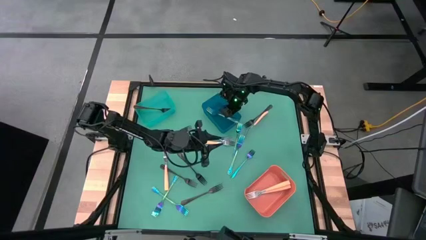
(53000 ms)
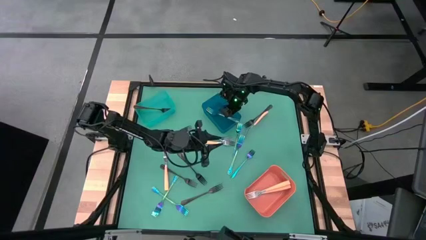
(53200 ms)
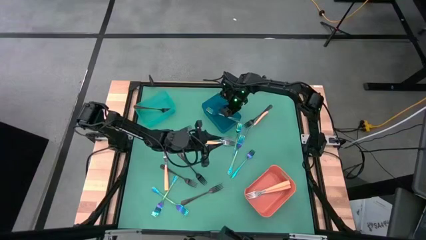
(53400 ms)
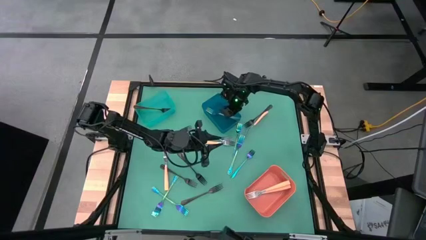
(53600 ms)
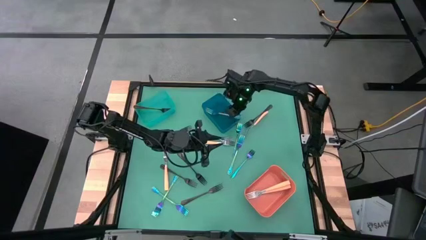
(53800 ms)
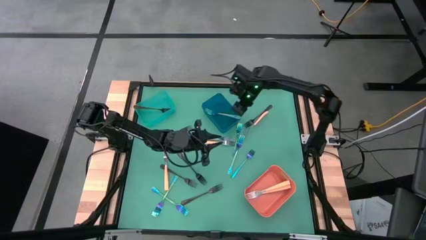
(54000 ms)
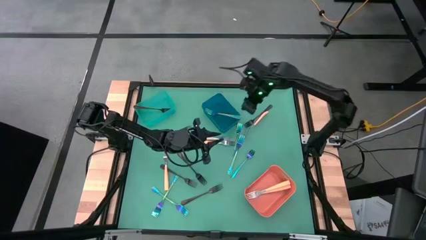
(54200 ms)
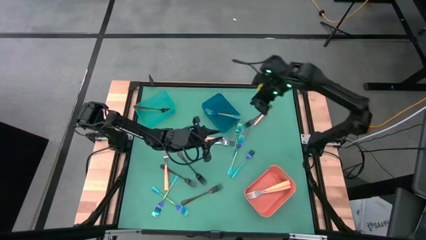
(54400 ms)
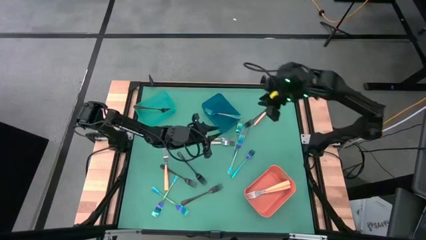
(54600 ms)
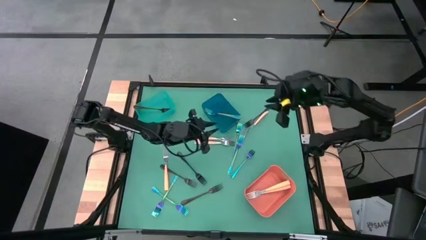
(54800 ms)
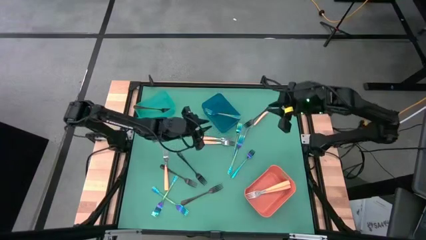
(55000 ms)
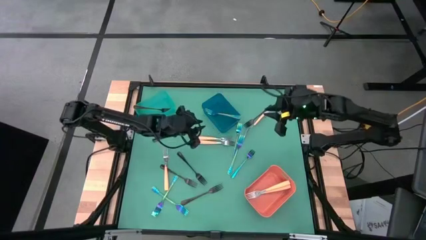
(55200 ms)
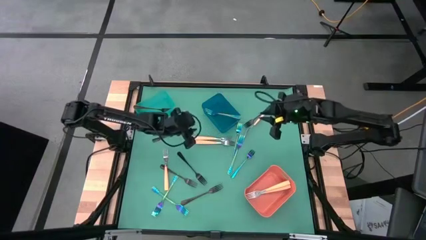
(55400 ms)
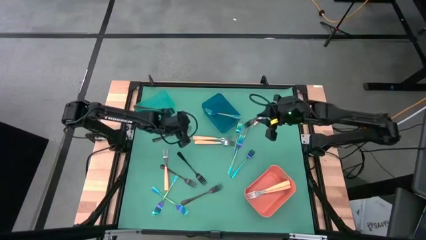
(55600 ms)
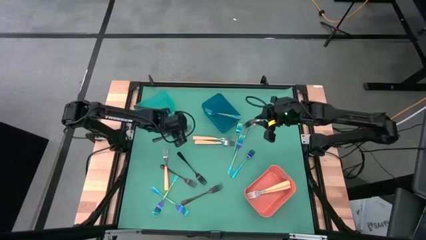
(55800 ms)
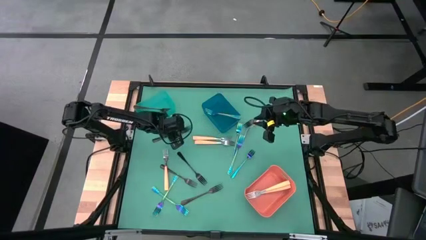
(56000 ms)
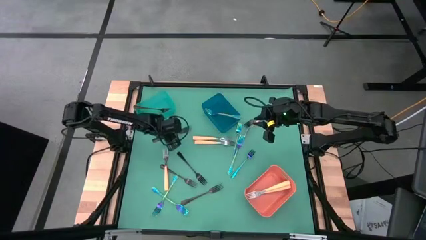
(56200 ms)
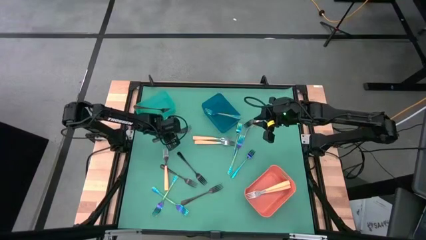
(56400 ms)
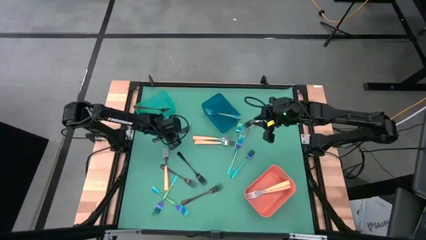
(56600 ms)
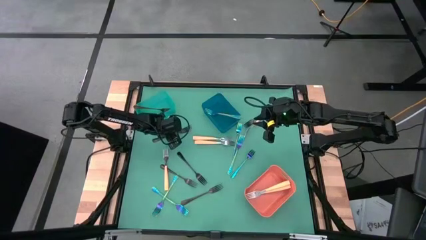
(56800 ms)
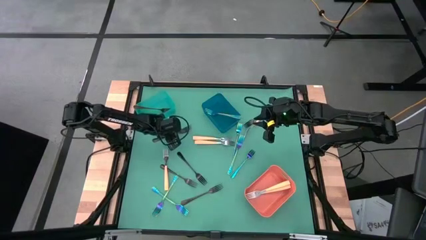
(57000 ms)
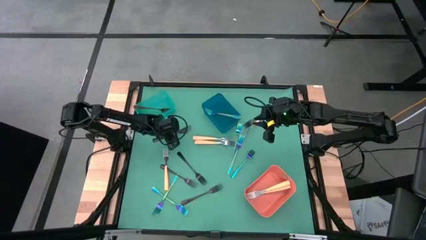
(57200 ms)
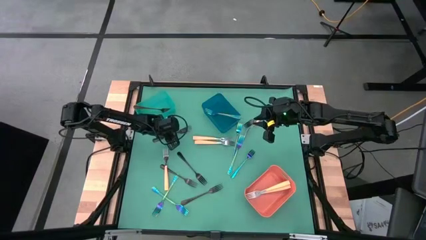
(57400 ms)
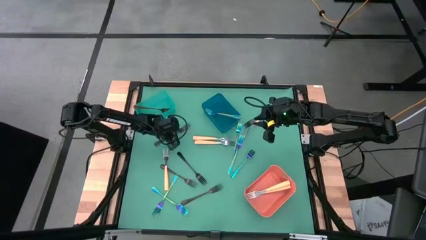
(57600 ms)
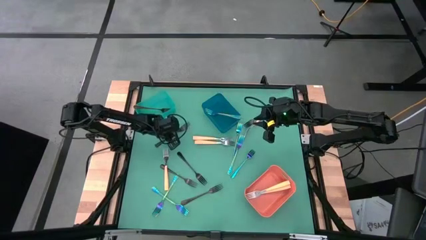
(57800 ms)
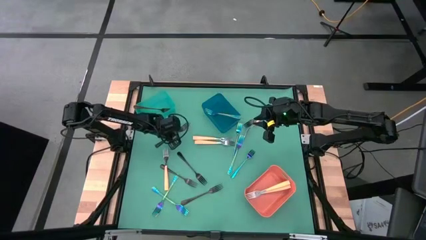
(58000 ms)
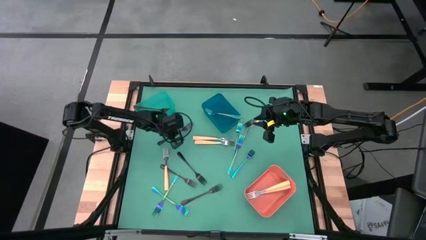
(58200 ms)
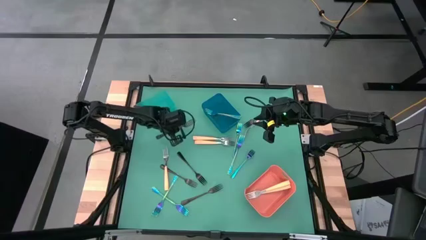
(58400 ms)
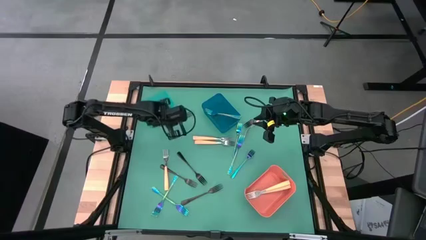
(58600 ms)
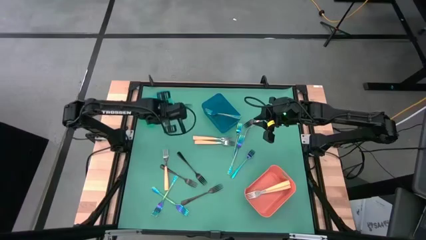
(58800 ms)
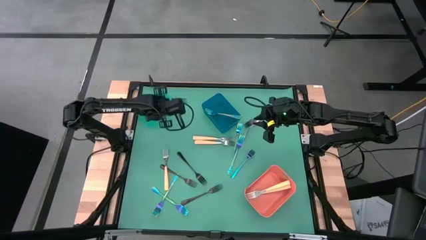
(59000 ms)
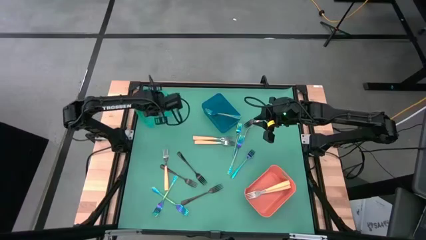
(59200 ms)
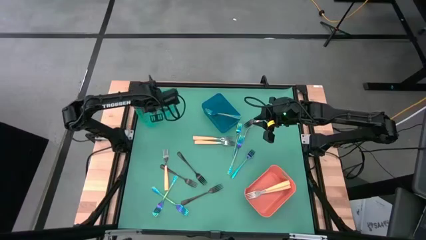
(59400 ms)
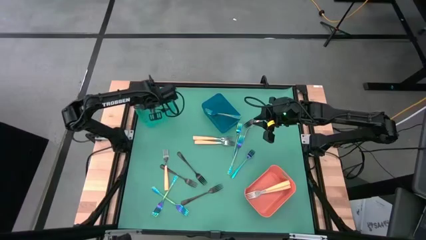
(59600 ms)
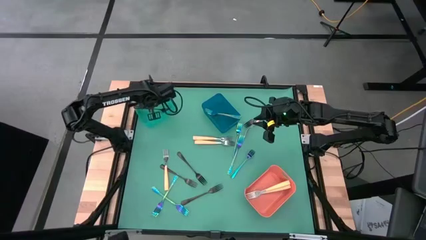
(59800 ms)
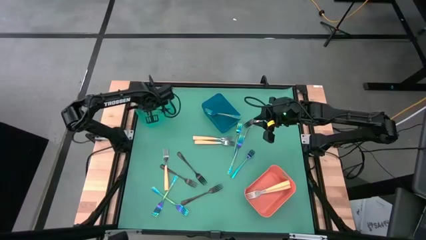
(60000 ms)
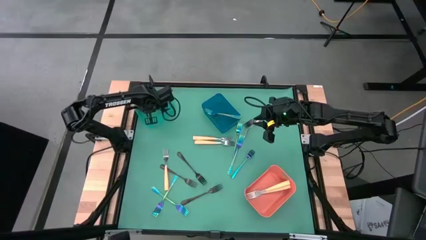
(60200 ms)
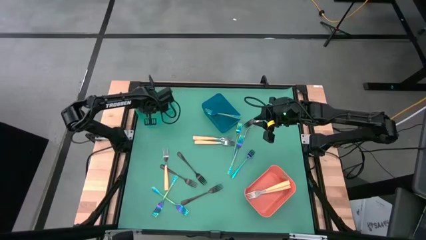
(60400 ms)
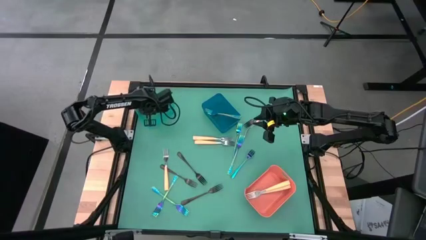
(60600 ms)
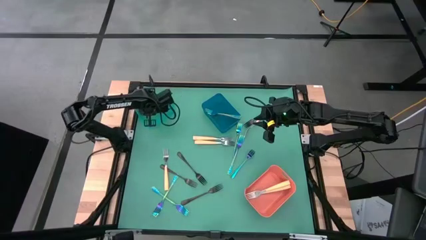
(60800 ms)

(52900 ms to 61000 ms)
Task: Sort silverware by color (type)
Put the black fork into the green bin

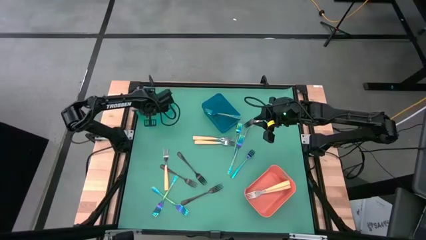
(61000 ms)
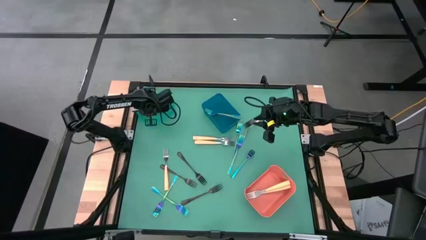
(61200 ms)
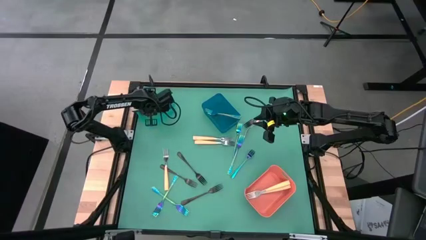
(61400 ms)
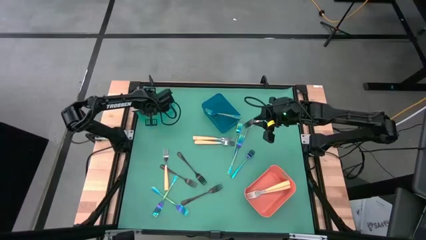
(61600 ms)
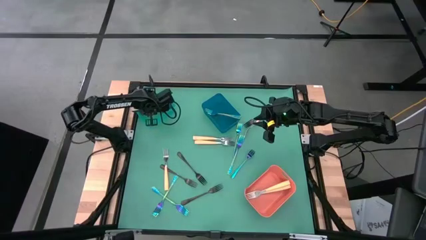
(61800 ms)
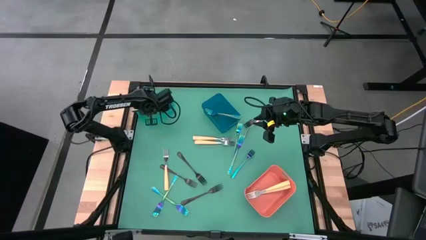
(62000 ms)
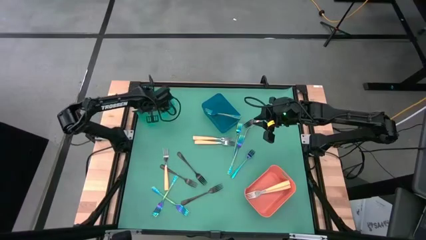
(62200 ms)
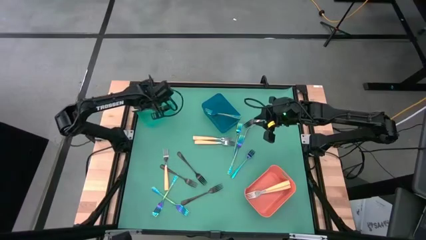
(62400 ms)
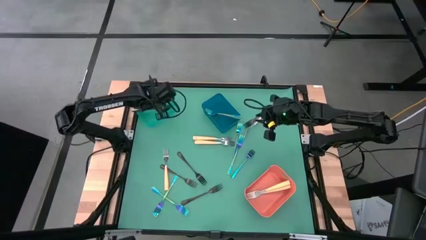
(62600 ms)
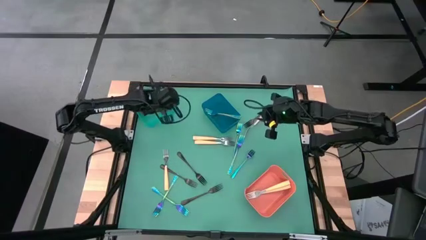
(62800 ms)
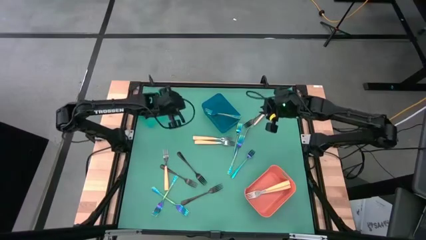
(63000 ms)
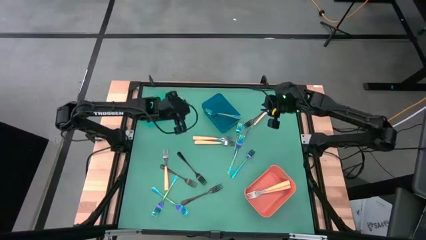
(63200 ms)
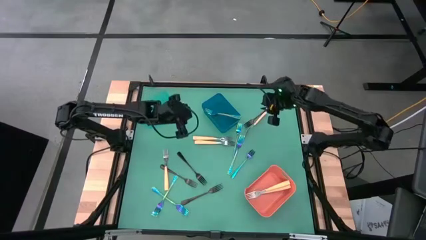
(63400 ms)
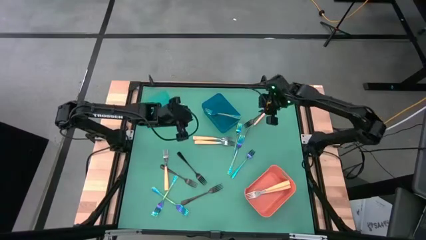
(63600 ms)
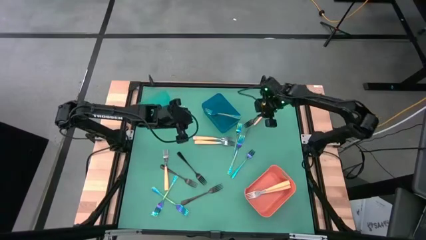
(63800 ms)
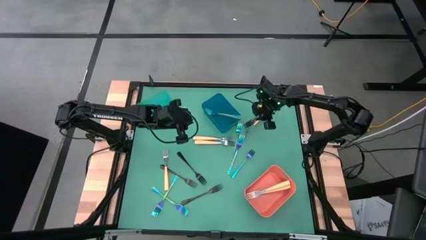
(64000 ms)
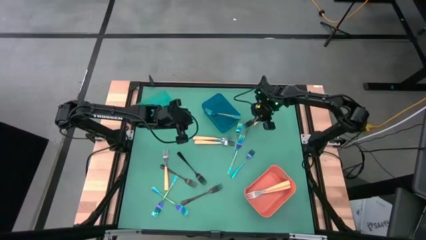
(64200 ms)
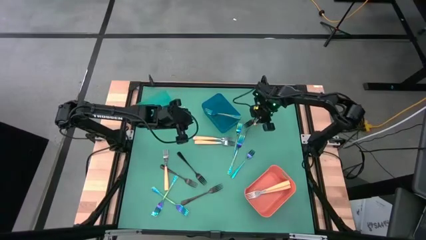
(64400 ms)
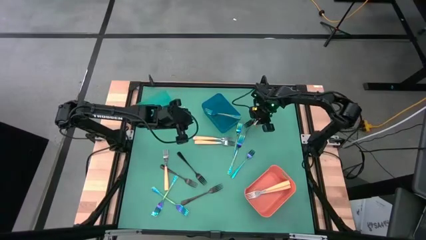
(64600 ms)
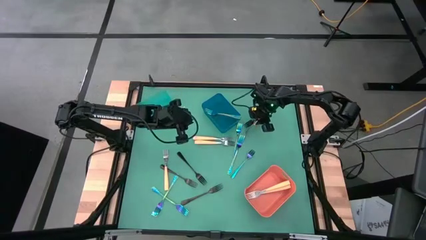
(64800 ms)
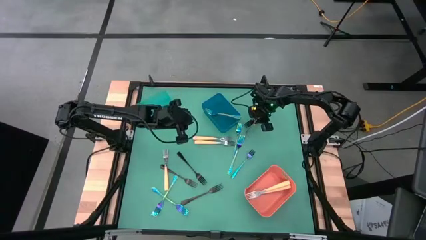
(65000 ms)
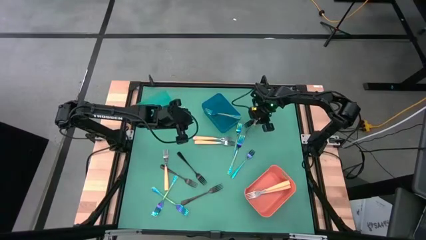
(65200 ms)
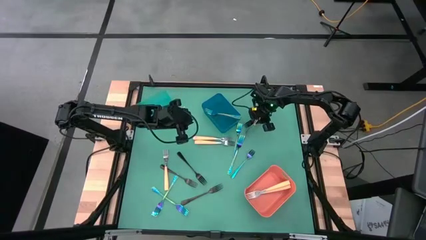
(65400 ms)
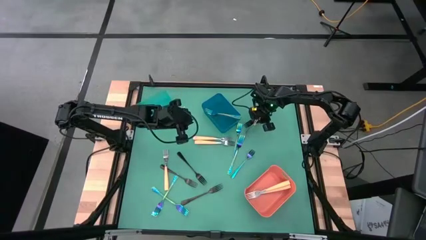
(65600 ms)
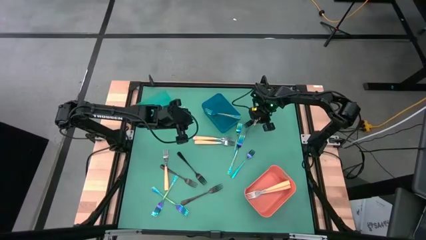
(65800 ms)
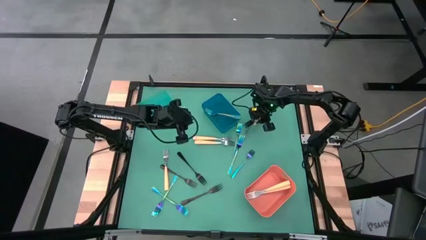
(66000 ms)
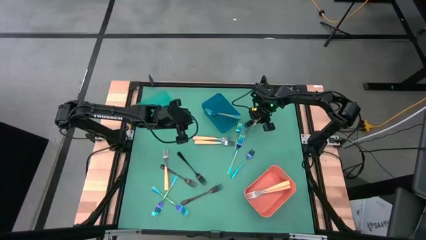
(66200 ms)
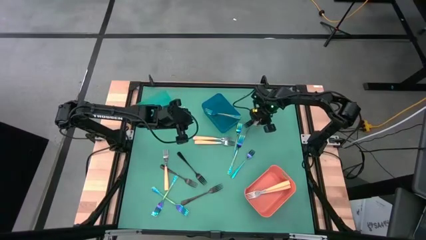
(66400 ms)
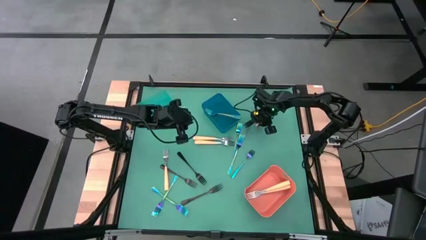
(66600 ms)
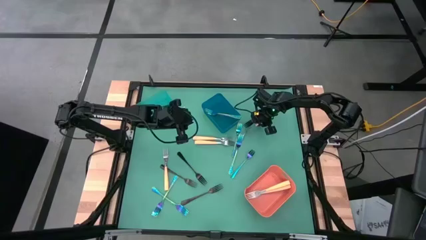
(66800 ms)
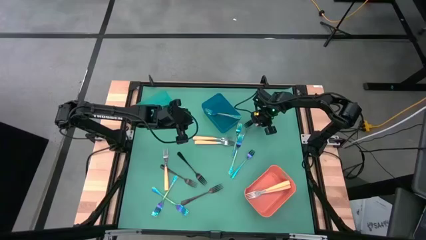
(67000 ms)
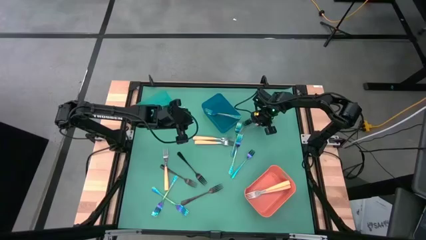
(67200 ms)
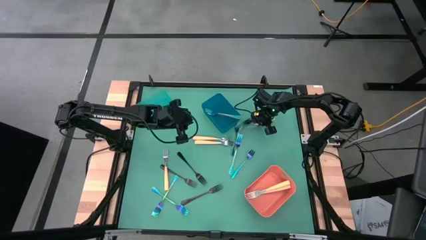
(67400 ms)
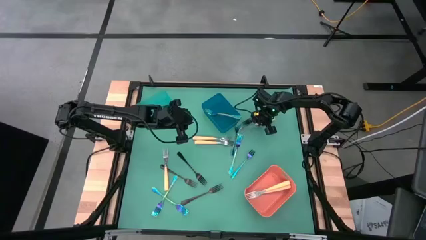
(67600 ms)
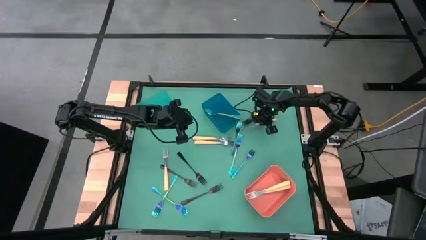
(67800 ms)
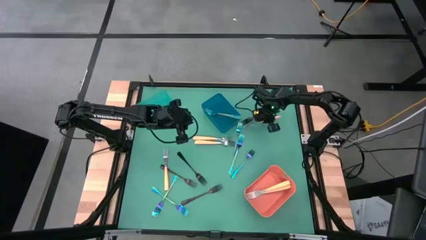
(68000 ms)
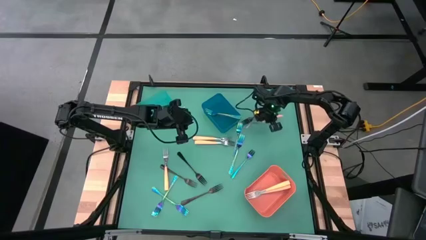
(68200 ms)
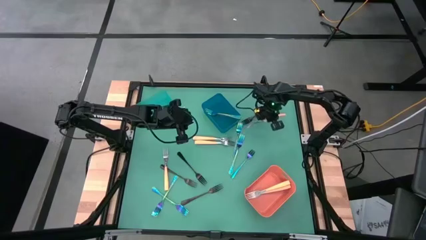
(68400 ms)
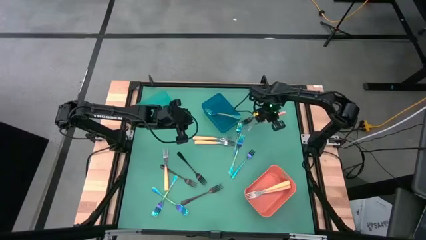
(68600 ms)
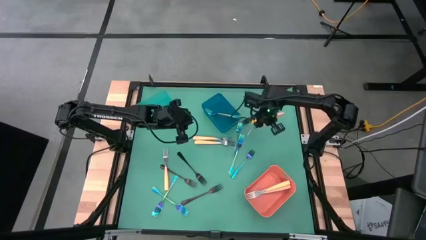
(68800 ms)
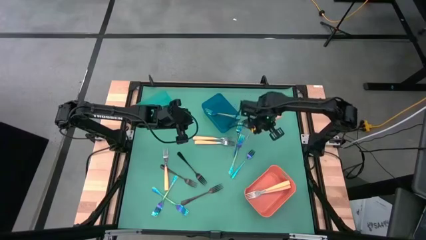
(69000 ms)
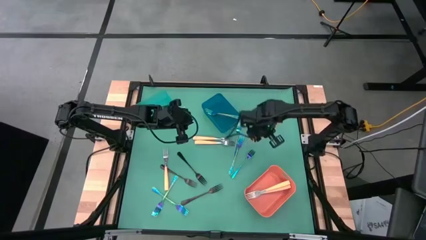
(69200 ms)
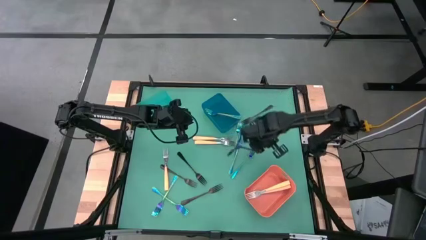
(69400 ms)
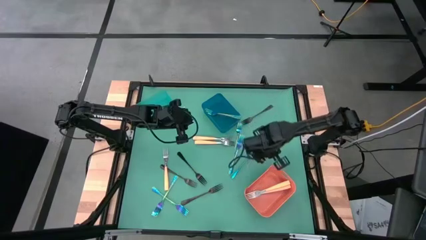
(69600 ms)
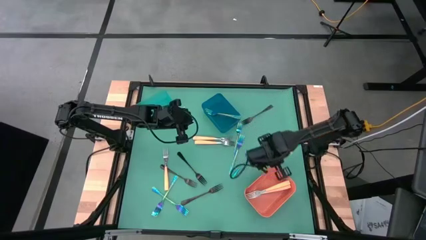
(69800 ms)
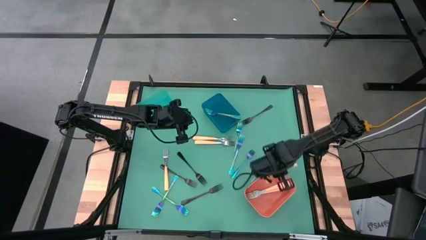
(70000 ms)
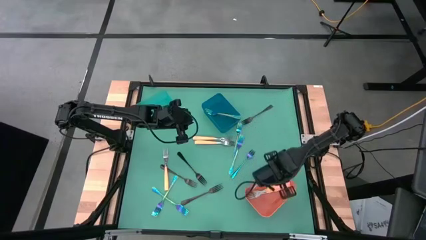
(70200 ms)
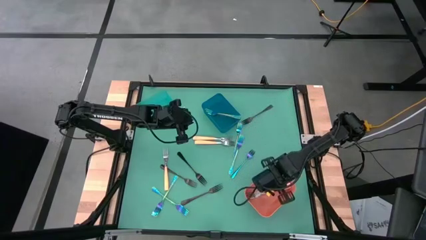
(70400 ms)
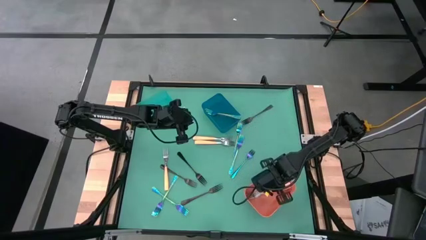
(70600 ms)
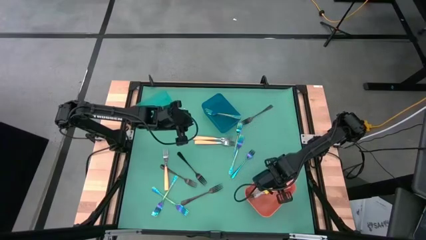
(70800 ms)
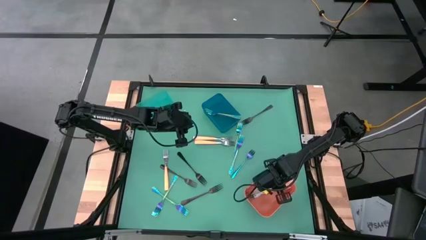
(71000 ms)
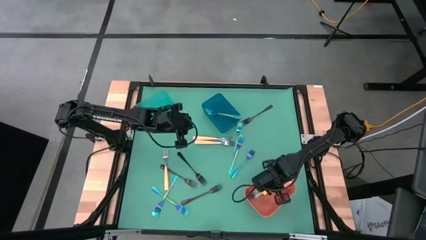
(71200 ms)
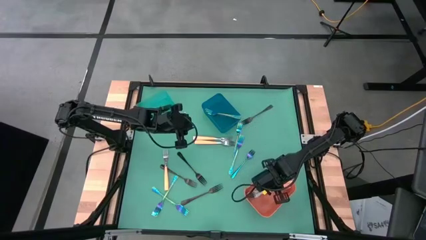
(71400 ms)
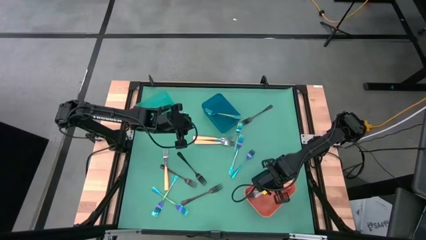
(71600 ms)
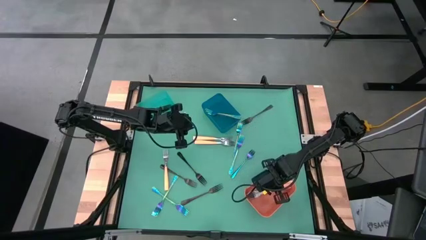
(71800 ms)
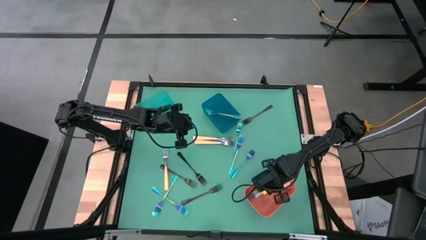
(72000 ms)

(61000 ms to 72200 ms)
Put the orange fork into the orange bin
